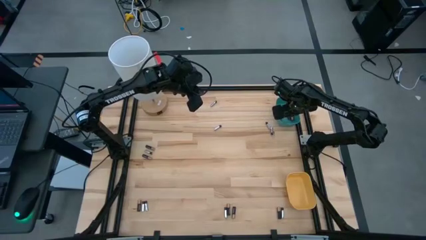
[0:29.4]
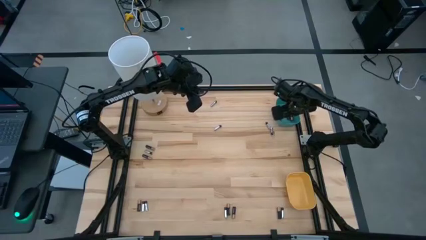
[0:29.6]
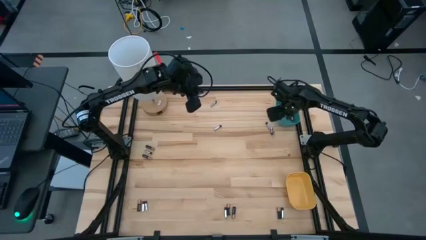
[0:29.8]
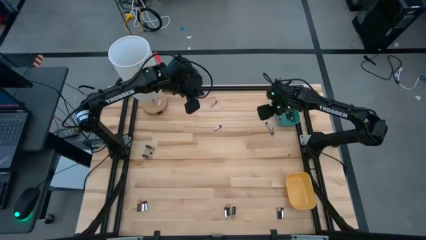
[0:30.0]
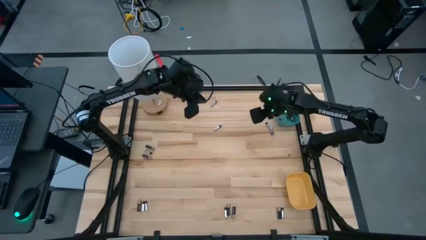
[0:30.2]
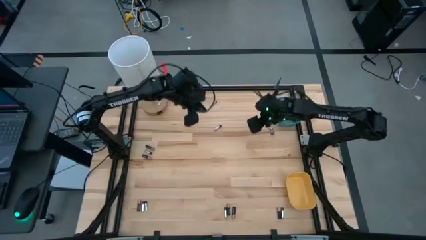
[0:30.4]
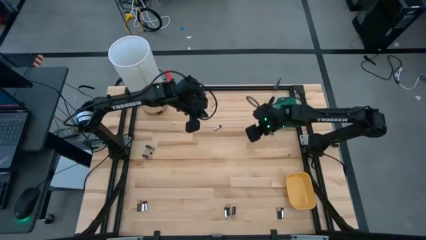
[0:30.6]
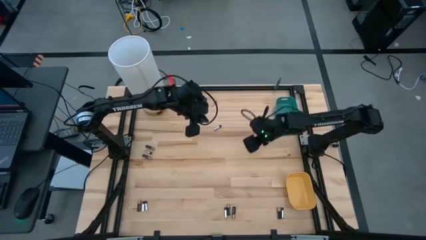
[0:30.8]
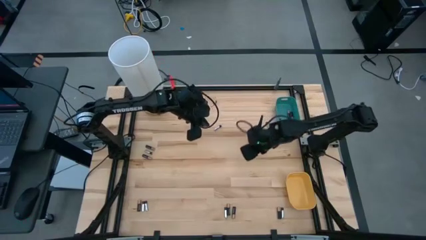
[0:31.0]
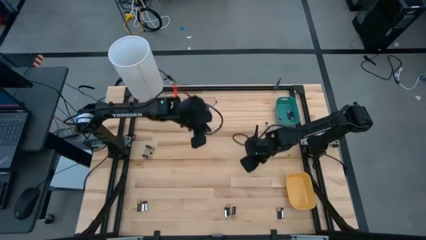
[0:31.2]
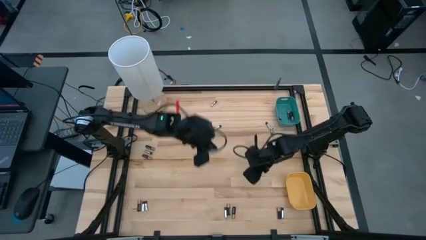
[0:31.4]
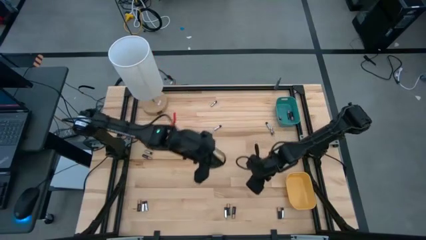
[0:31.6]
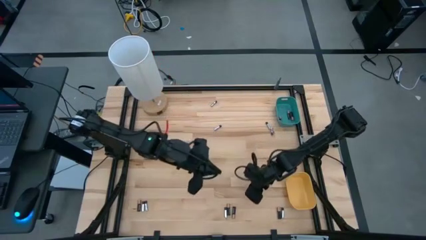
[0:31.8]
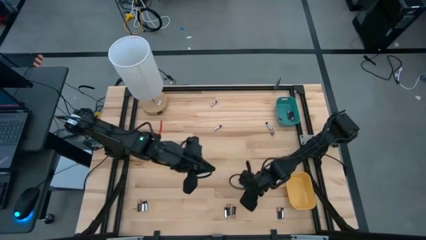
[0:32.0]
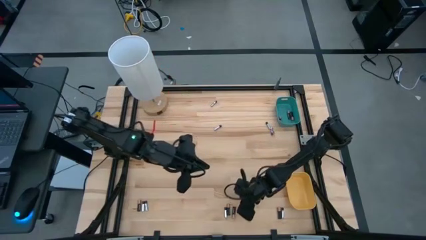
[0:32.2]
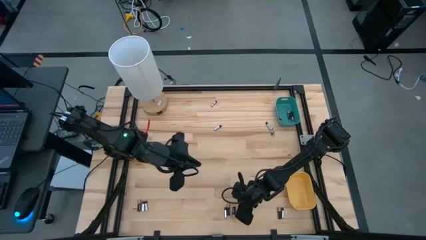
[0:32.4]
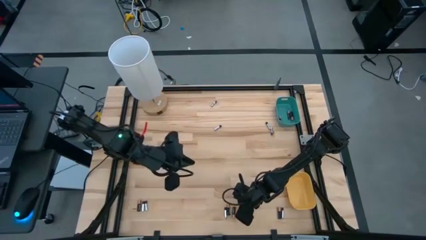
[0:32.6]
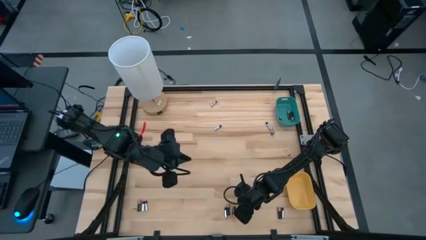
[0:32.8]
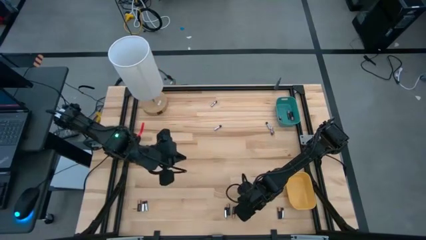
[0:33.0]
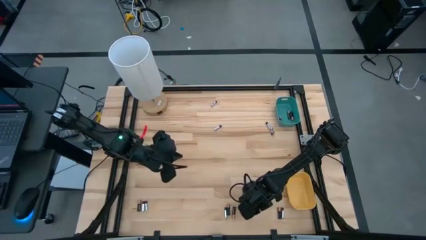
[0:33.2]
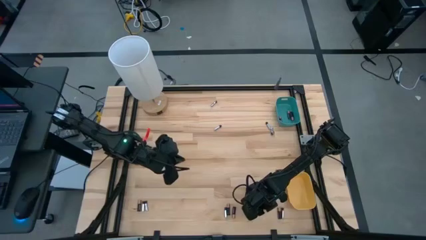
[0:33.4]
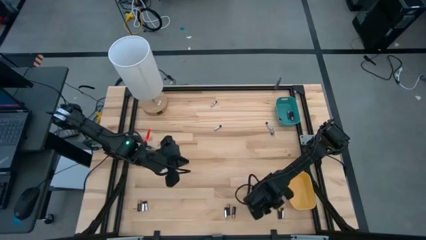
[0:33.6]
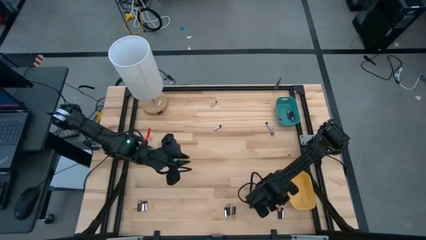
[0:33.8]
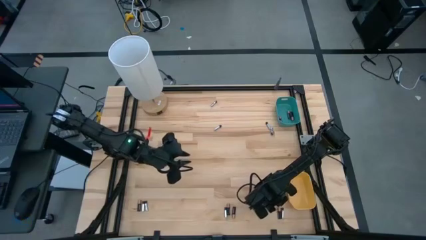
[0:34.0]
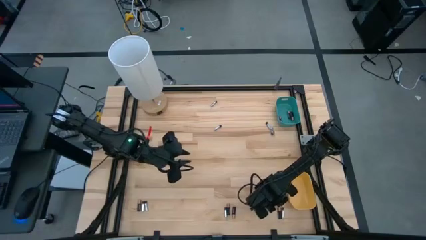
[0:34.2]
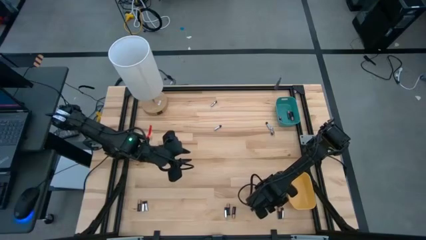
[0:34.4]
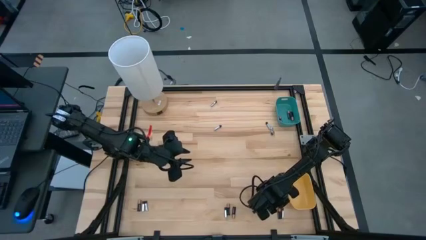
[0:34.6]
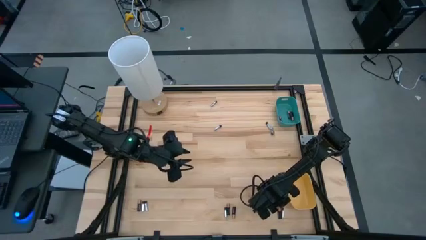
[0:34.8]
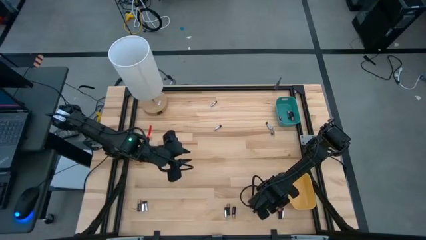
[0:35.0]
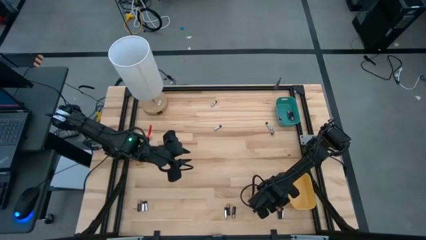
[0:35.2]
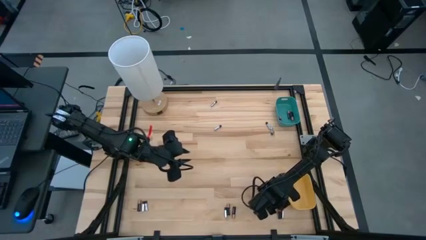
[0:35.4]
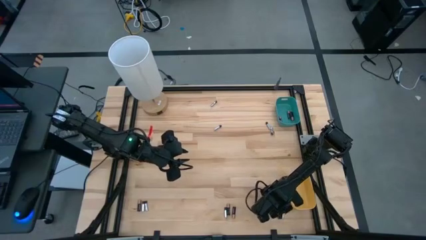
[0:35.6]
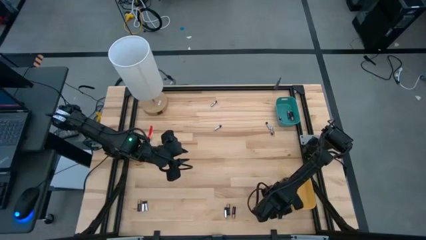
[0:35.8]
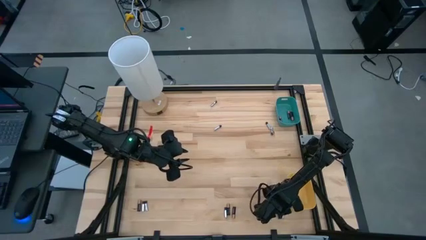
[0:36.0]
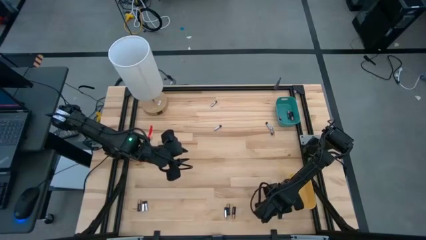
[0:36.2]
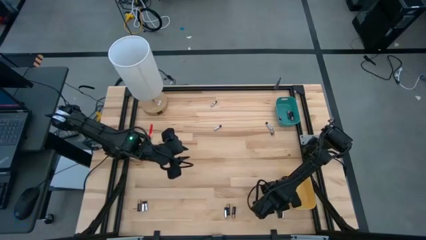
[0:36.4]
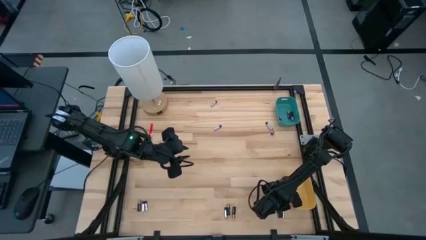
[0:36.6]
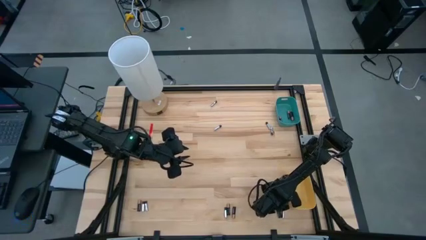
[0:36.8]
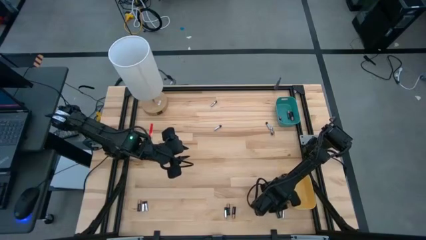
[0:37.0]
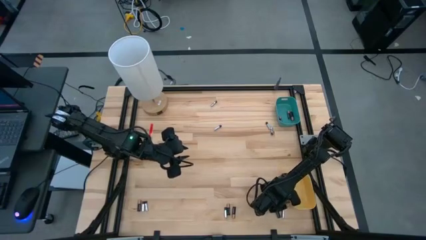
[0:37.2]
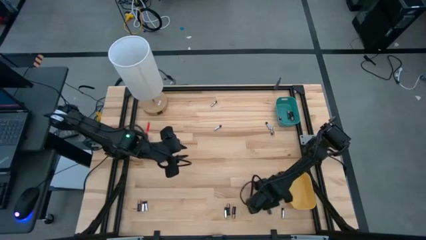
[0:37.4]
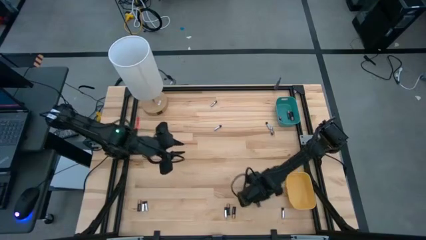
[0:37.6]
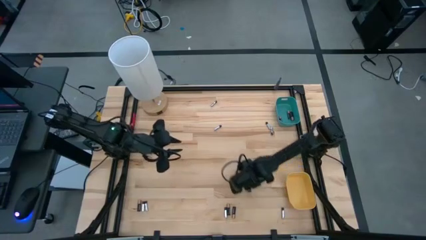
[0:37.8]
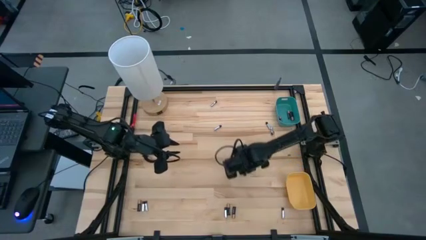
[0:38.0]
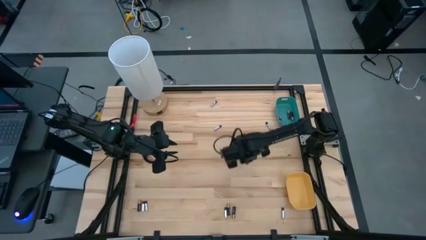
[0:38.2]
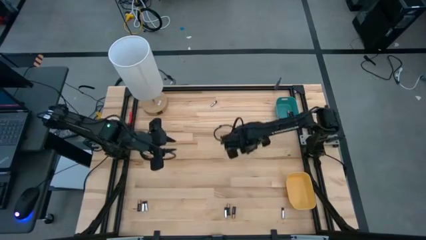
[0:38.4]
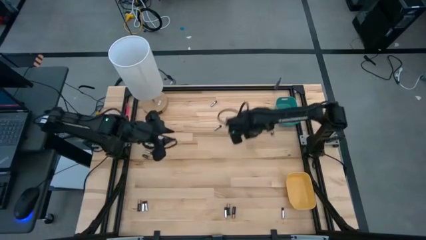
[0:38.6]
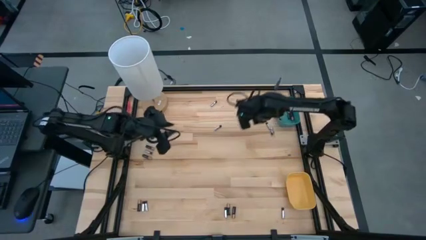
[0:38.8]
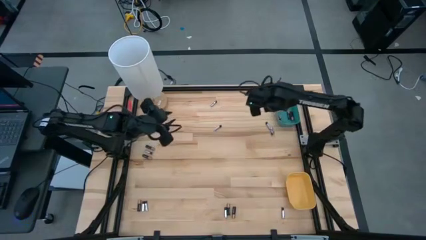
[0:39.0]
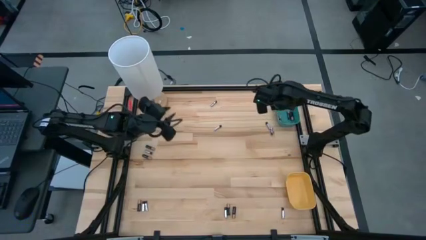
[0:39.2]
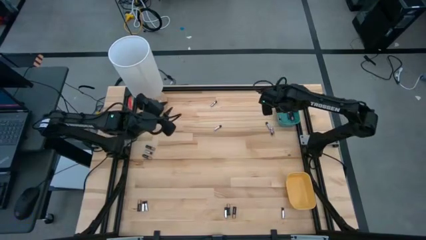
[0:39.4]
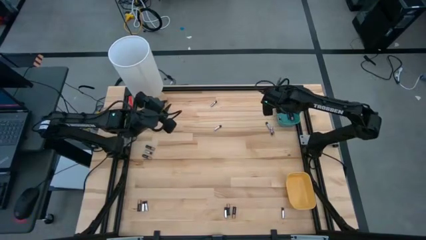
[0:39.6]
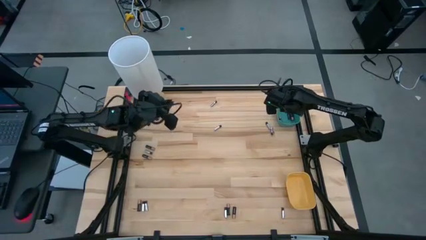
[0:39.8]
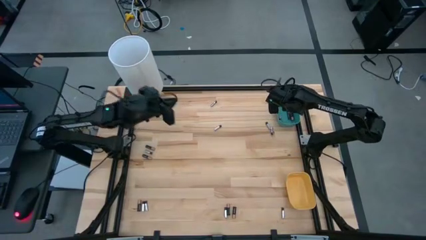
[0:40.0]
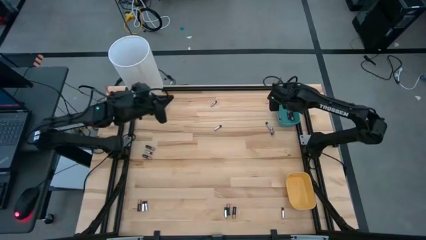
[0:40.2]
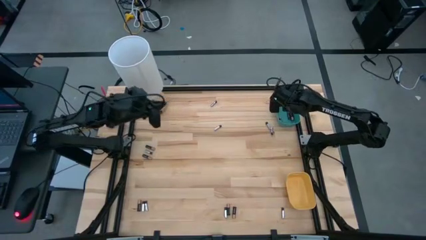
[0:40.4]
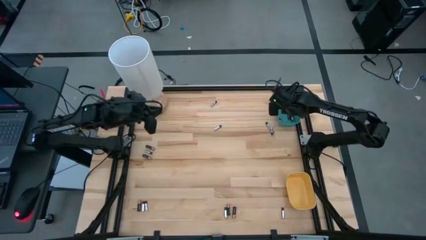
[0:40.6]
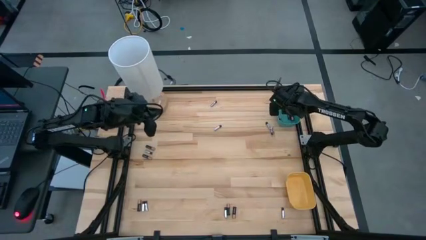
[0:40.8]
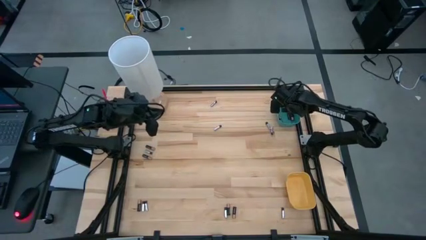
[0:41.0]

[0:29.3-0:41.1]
Task: Sort batteries
Put the black battery into the blue bin

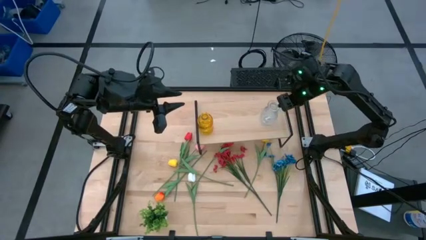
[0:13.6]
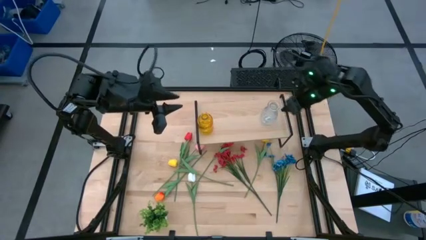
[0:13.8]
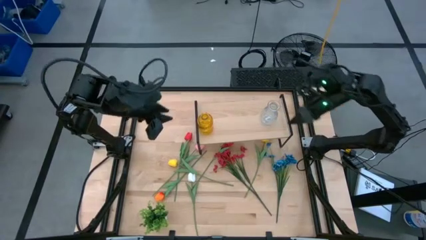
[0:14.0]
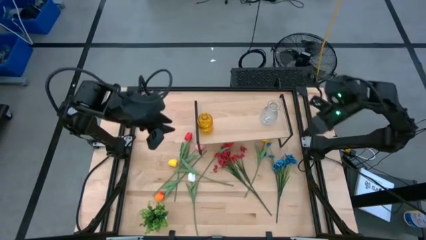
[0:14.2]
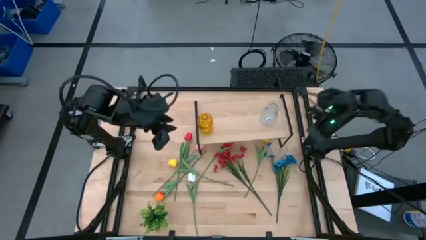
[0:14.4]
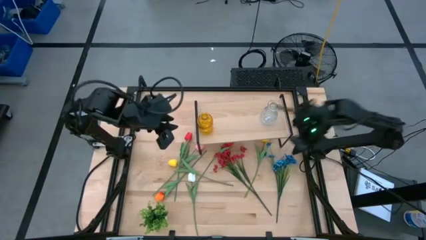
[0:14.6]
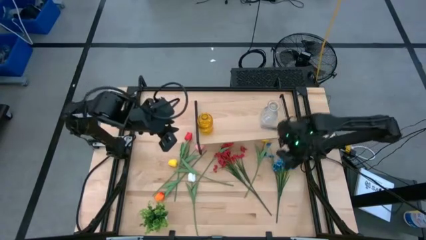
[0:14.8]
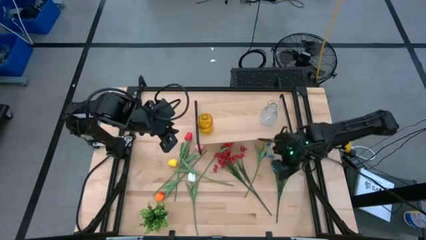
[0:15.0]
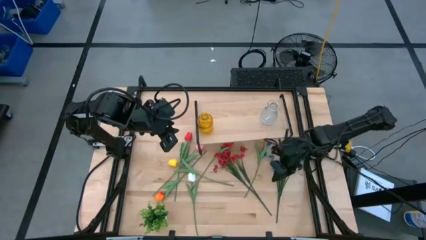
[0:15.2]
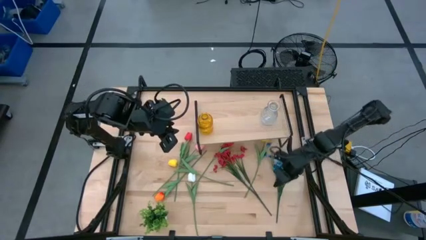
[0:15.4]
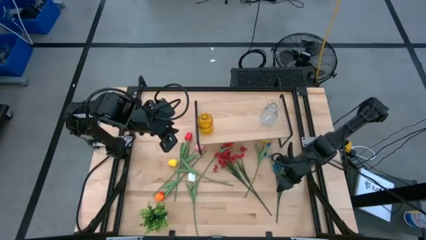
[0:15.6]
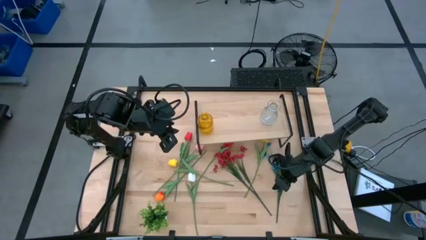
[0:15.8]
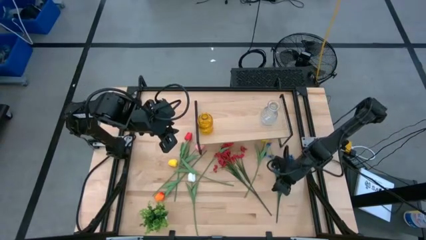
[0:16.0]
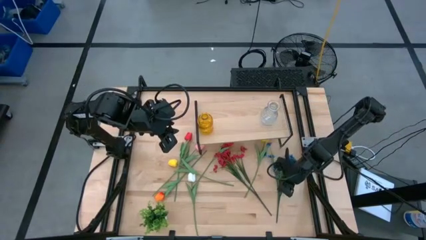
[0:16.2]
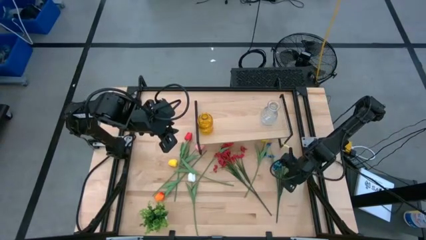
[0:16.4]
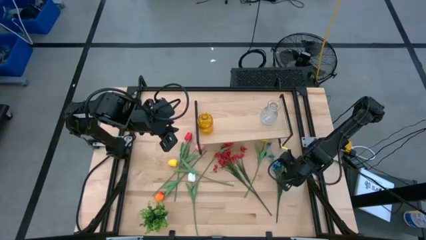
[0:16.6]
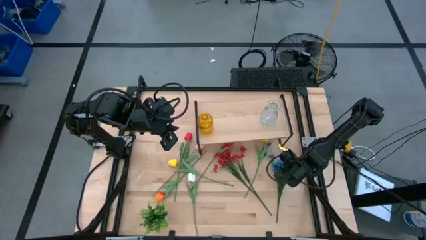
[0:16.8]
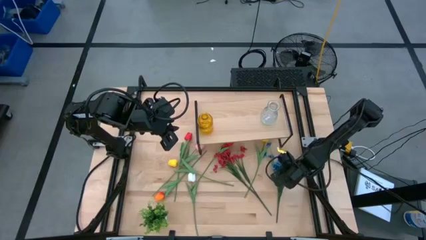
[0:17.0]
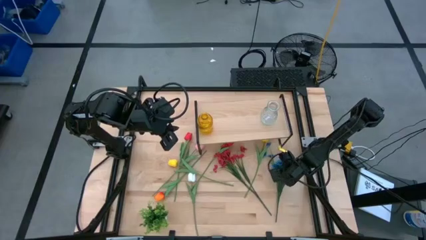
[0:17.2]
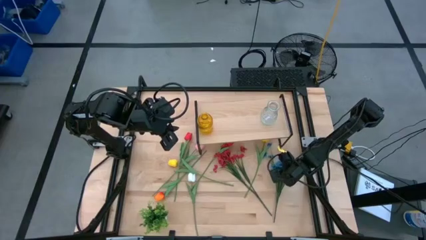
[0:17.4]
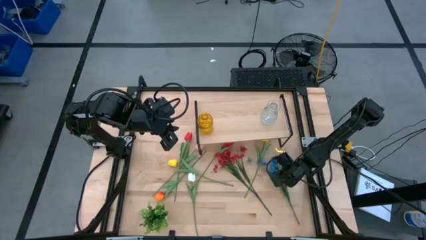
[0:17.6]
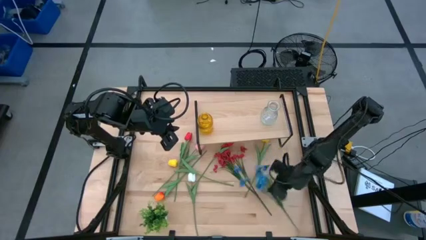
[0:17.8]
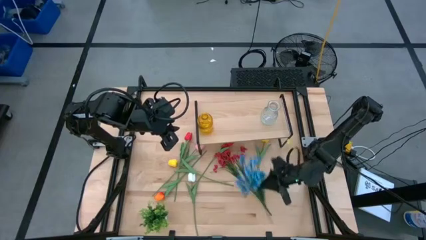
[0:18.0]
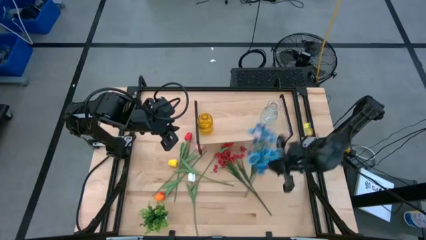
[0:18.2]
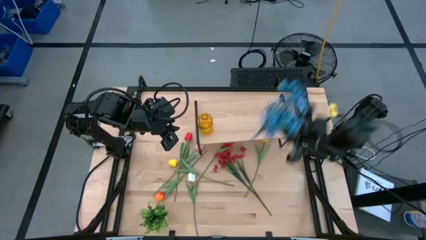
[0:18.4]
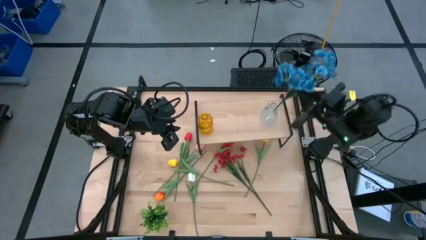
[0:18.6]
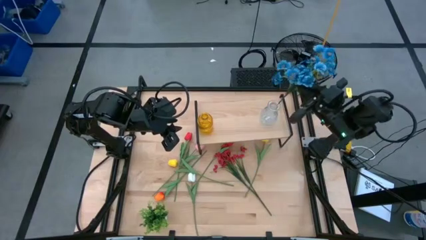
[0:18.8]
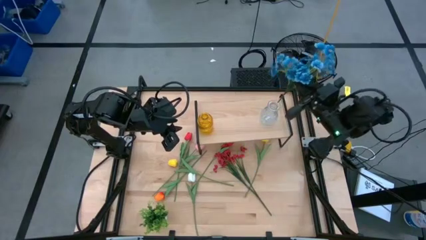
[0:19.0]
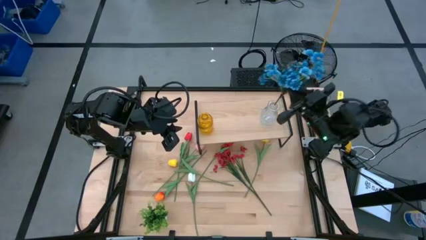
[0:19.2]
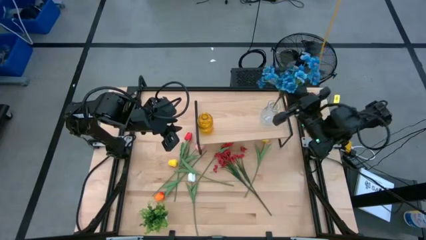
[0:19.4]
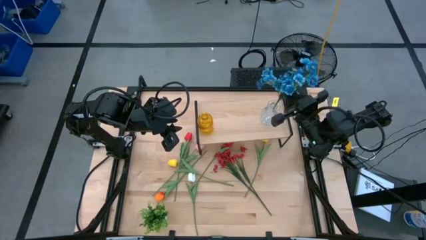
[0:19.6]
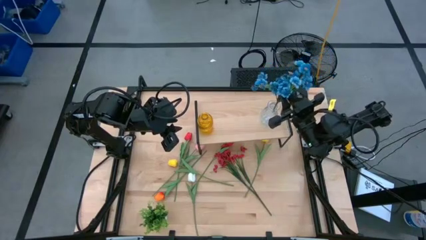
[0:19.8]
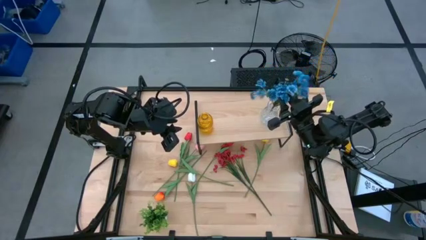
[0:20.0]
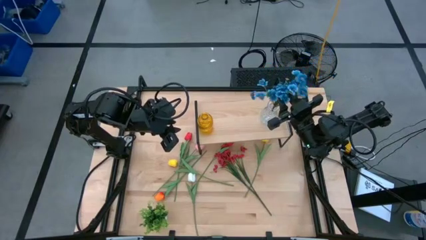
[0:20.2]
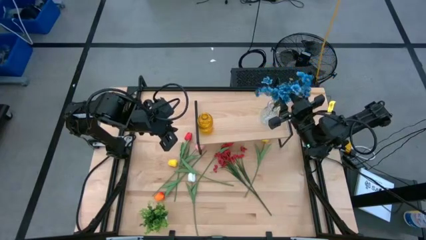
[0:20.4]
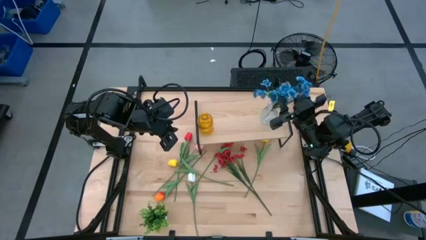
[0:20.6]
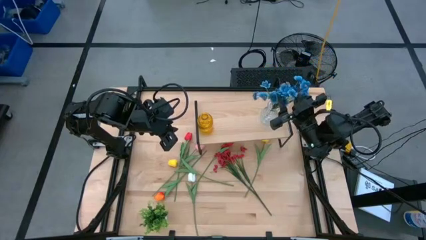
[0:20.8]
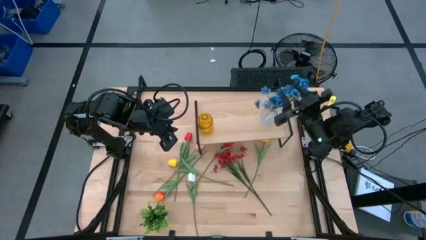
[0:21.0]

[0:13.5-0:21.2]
Task: Pick and place flowers into a vace then onto a shelf
Put the blue flowers into the transparent vase
